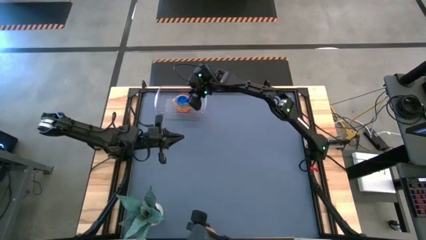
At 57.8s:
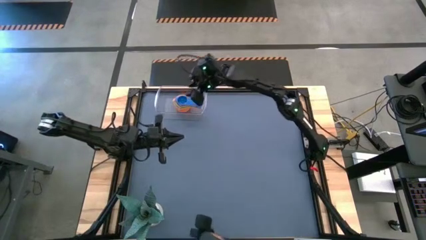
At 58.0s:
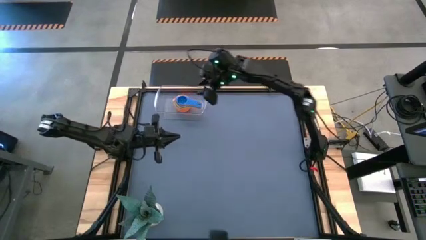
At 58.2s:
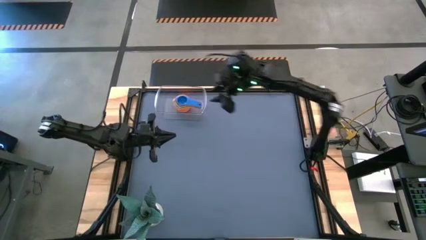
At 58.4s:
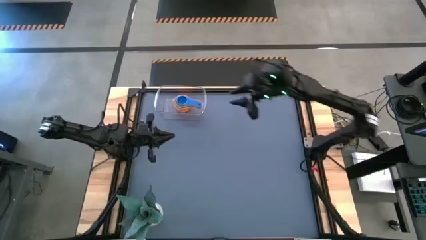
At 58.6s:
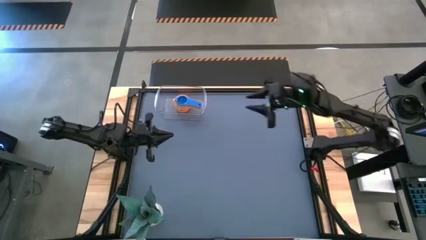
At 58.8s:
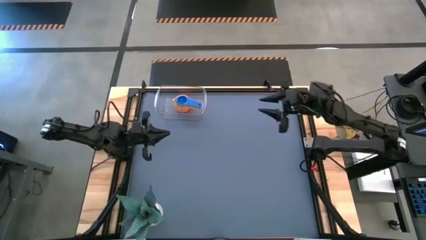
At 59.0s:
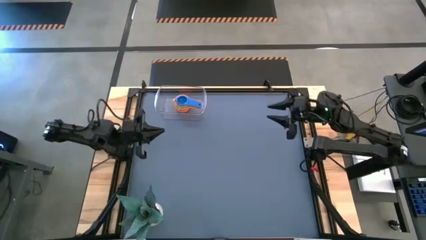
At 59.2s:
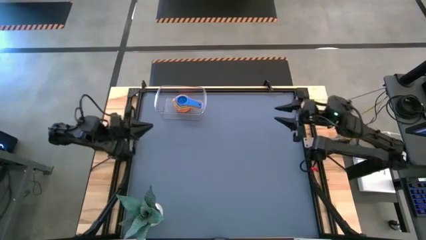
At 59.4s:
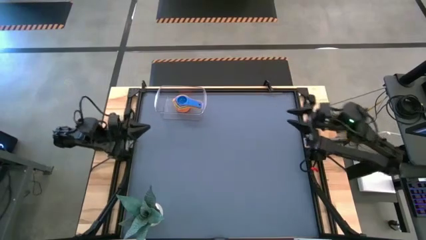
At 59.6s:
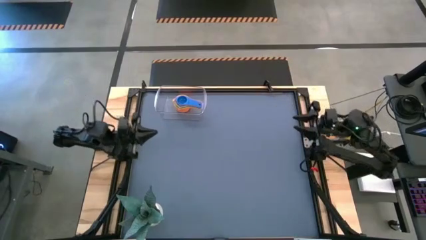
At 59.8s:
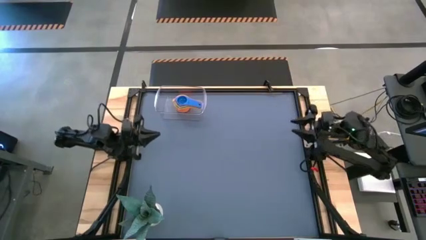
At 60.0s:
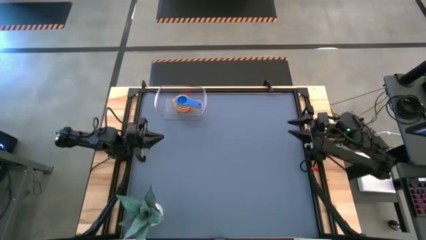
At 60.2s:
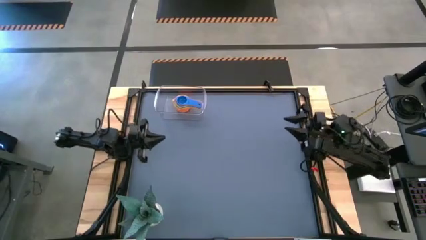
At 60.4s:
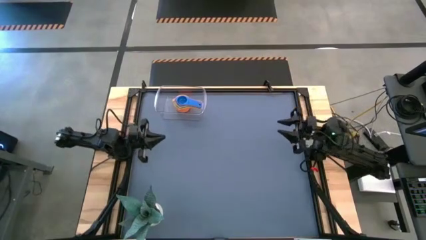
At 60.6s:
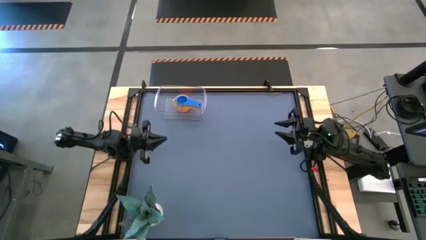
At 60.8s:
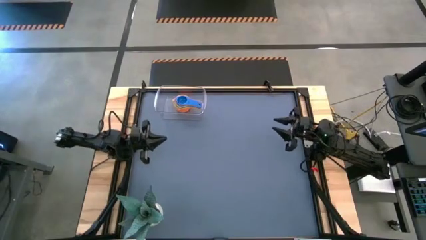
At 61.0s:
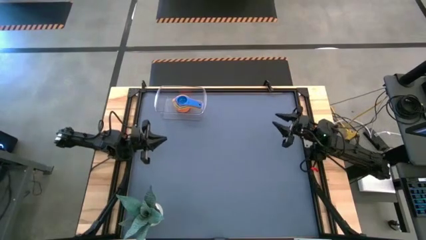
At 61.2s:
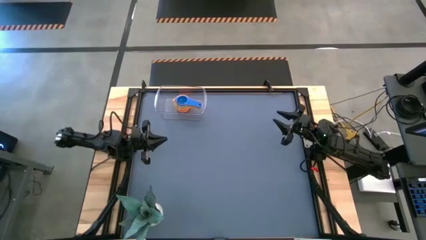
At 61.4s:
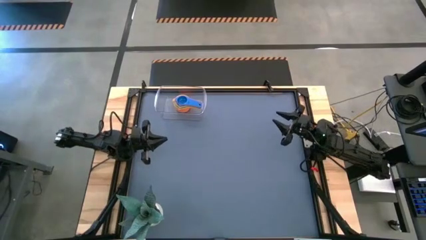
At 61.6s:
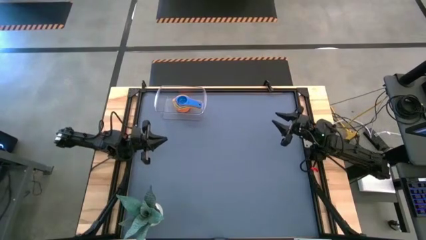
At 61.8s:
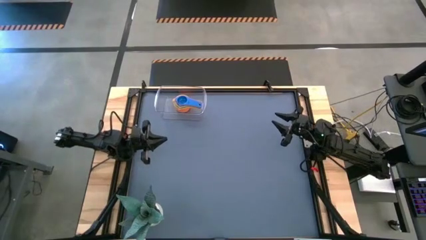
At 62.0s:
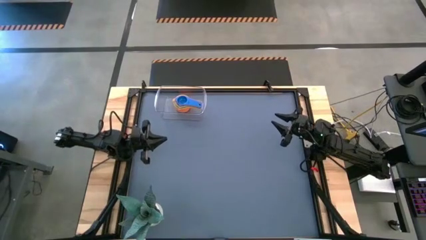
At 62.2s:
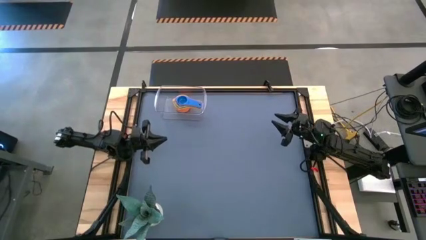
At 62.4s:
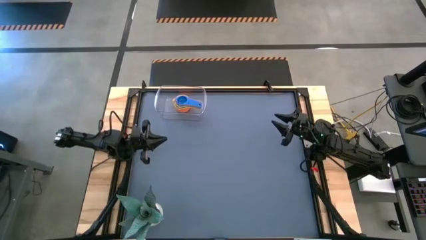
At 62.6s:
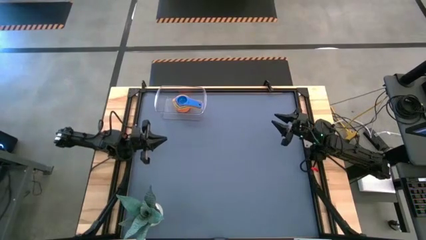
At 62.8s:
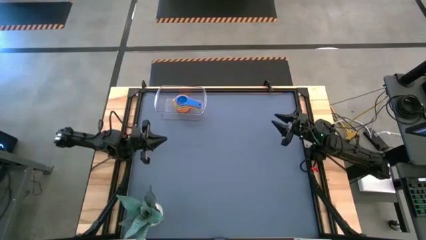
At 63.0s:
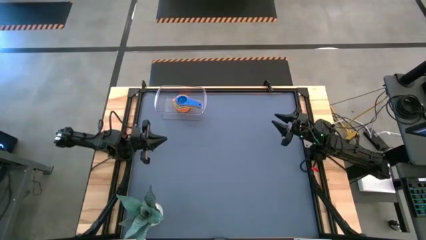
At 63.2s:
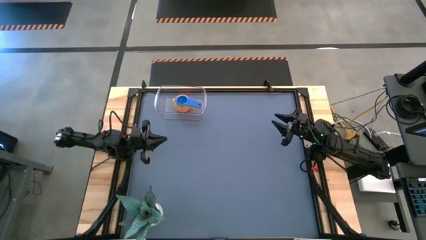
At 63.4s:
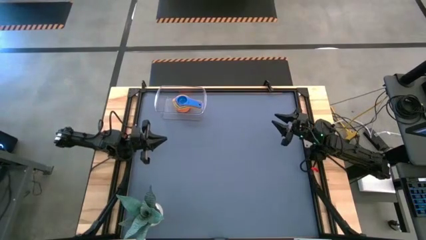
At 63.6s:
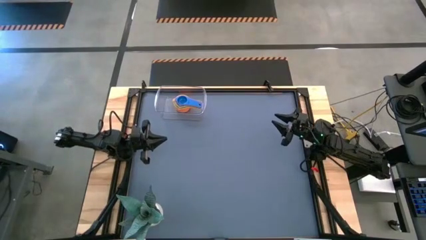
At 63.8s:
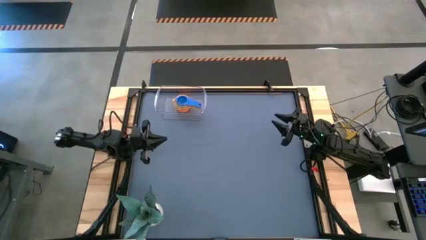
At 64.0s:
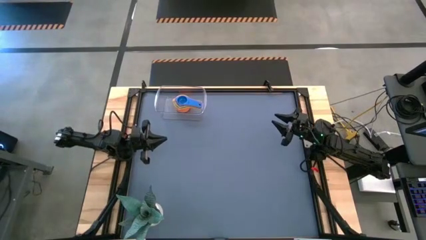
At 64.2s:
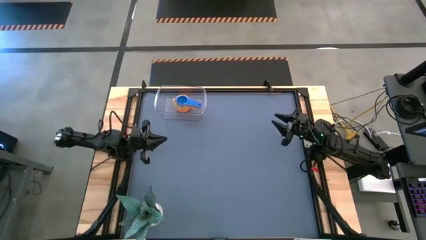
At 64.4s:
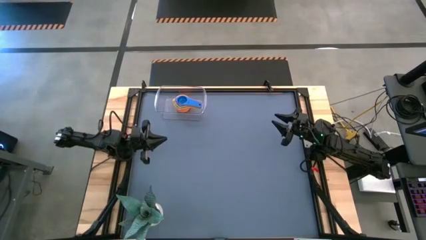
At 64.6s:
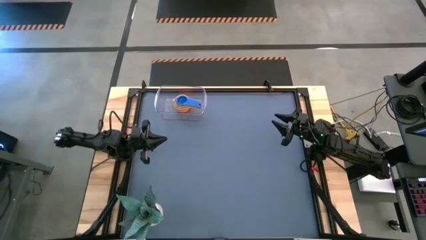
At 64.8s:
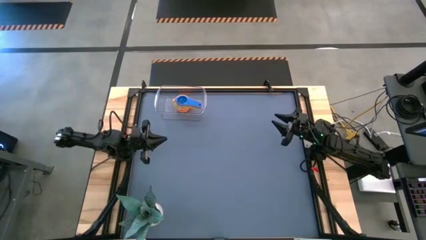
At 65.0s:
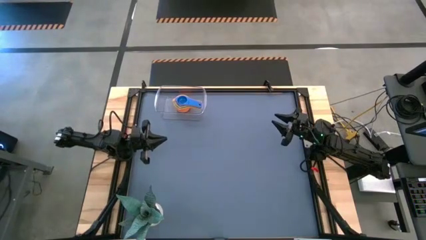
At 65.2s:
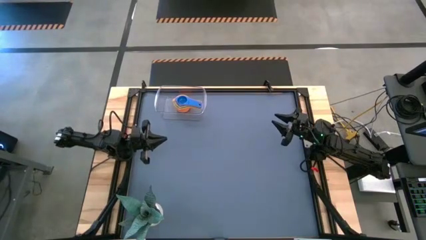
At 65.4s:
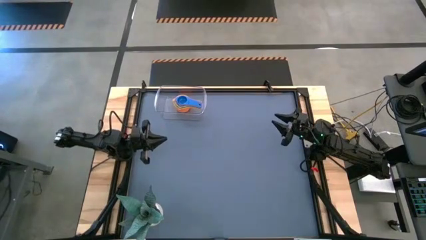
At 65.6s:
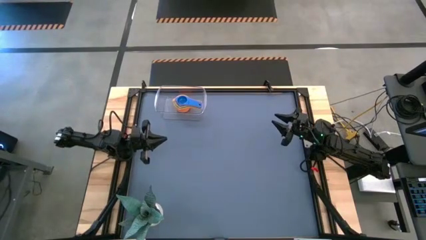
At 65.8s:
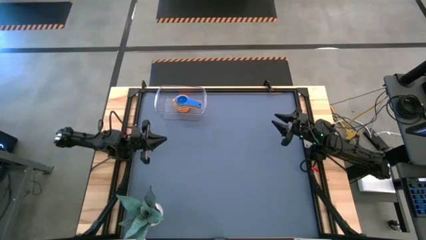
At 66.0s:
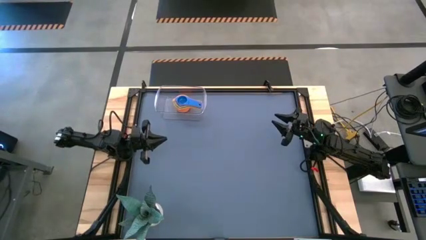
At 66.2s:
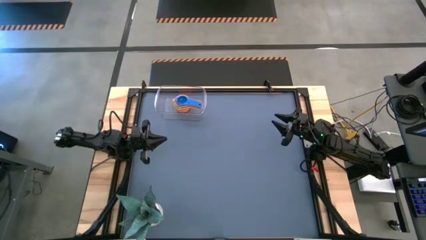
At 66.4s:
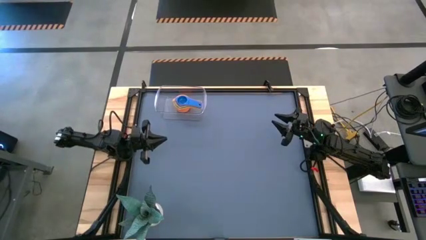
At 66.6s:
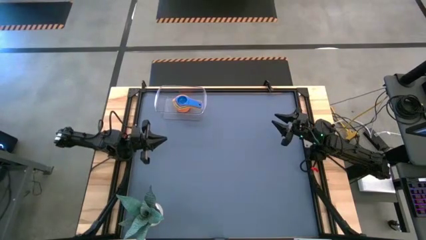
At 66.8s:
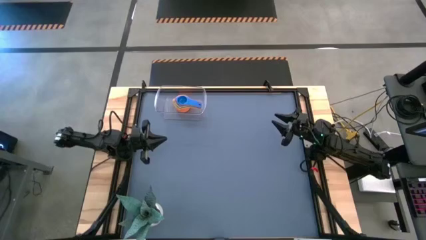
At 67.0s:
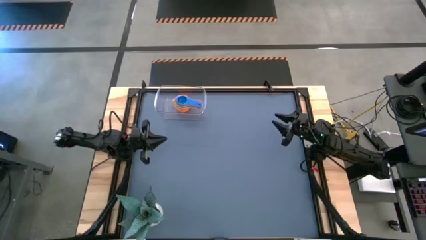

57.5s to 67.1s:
Task: Nest measuring cups in basket
Return to Home Position

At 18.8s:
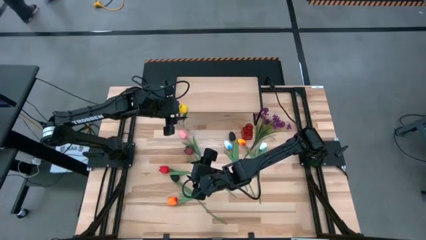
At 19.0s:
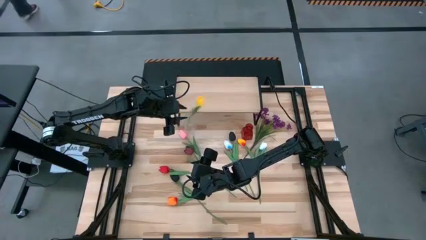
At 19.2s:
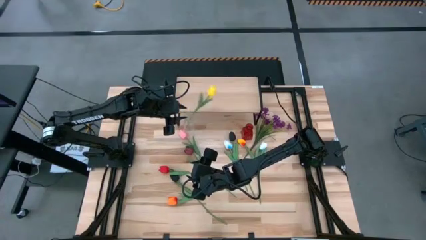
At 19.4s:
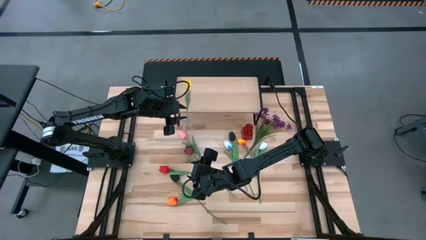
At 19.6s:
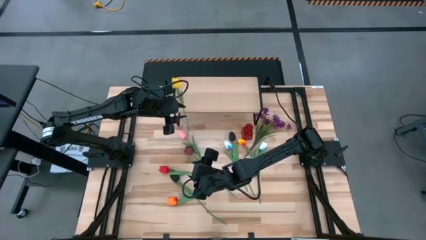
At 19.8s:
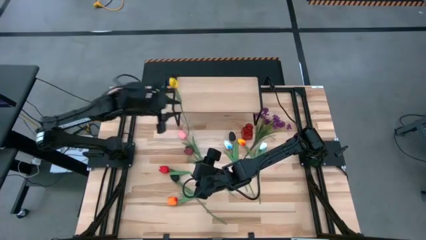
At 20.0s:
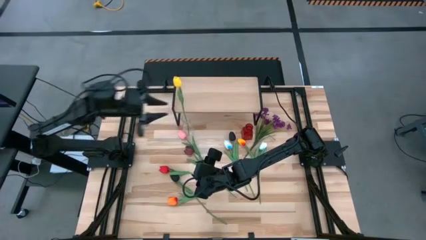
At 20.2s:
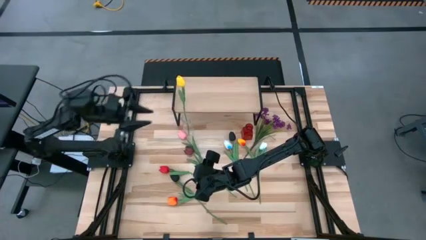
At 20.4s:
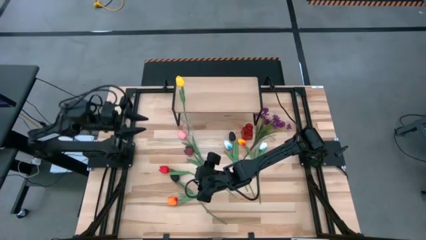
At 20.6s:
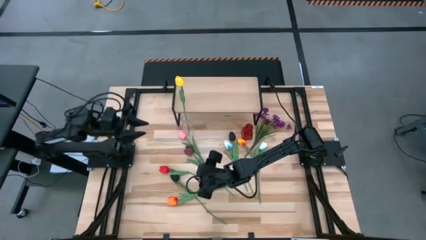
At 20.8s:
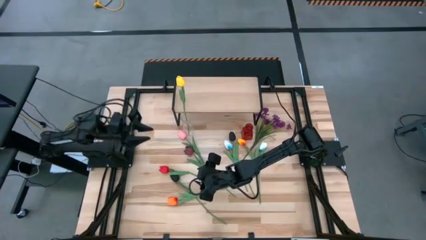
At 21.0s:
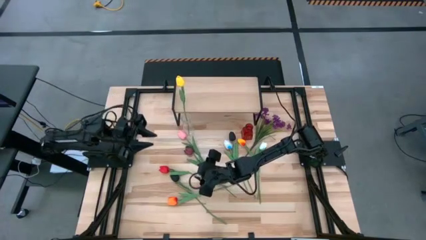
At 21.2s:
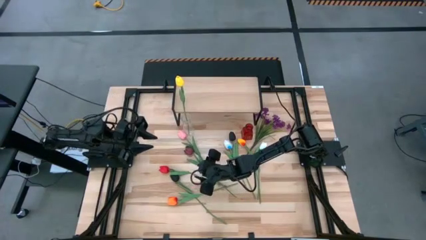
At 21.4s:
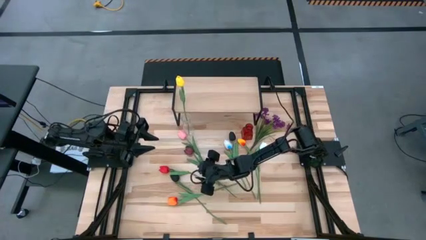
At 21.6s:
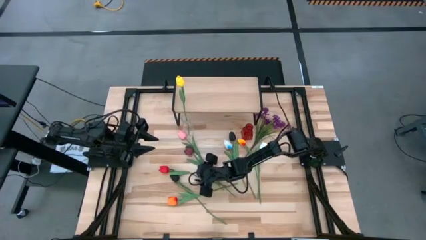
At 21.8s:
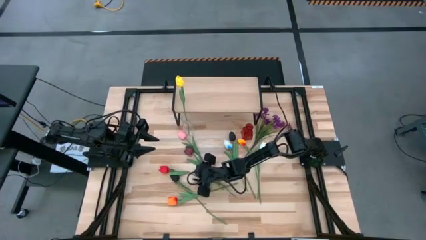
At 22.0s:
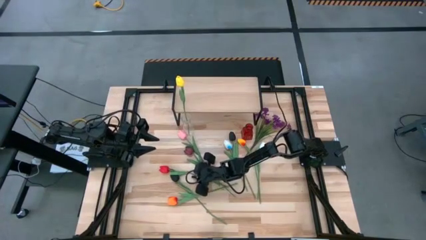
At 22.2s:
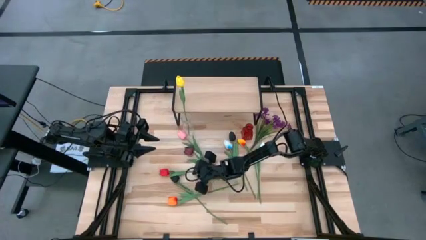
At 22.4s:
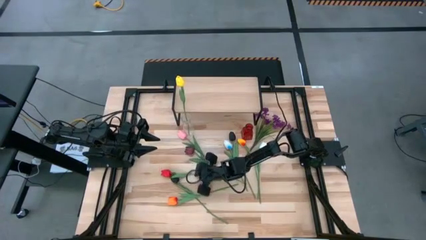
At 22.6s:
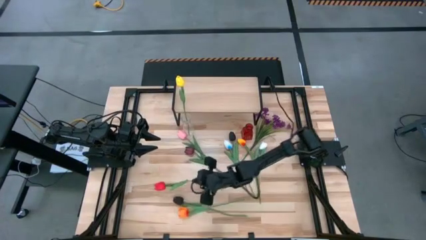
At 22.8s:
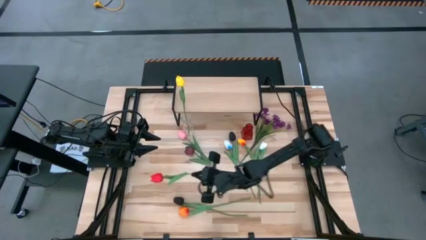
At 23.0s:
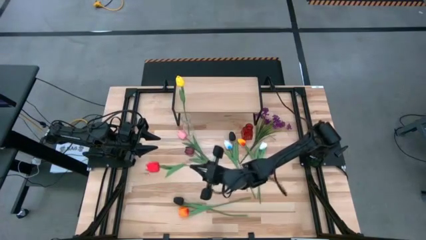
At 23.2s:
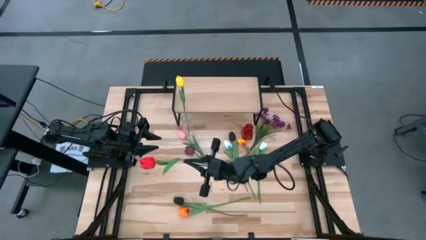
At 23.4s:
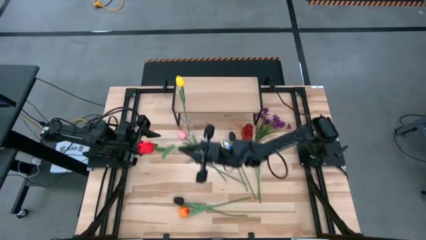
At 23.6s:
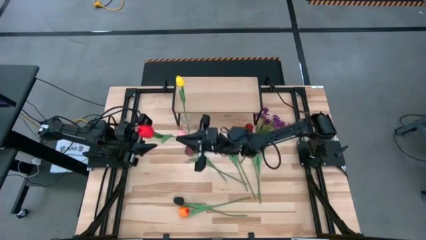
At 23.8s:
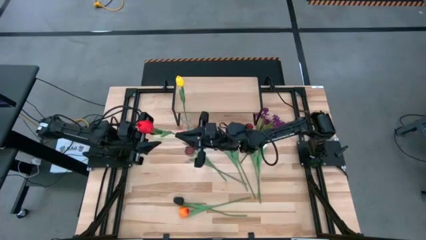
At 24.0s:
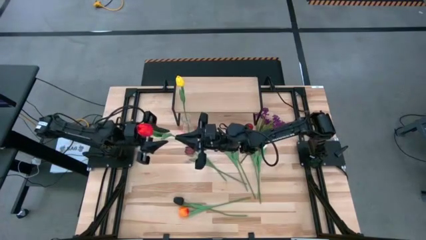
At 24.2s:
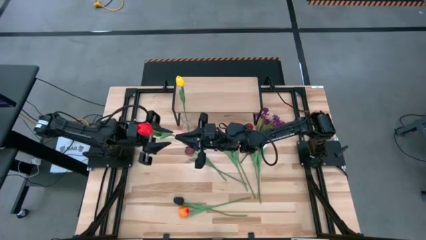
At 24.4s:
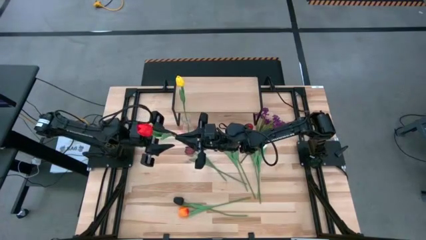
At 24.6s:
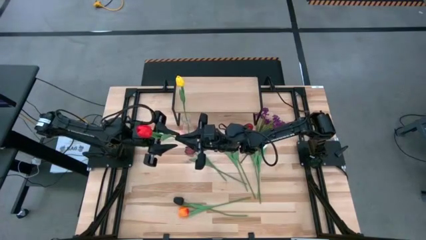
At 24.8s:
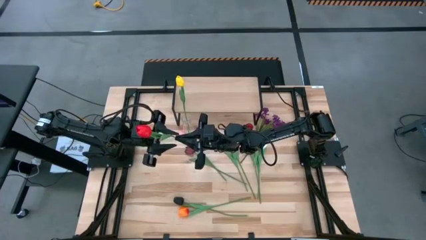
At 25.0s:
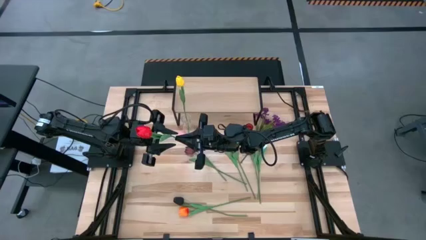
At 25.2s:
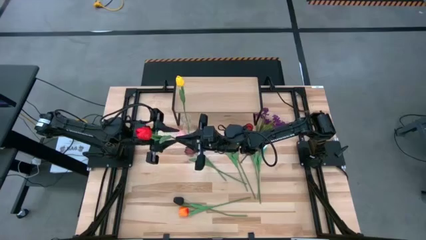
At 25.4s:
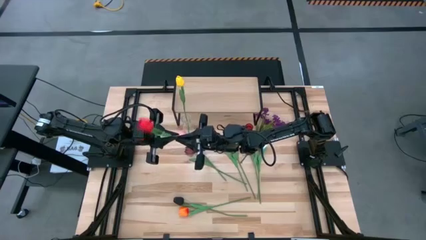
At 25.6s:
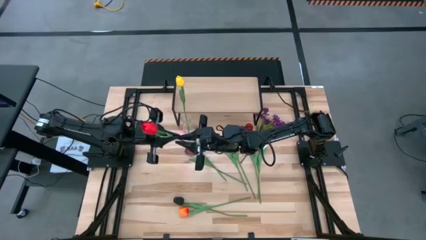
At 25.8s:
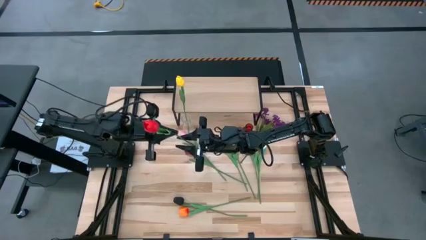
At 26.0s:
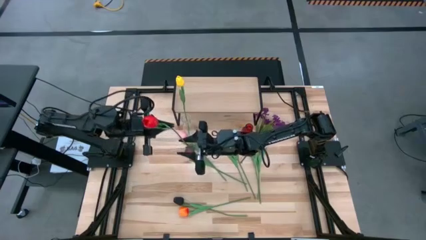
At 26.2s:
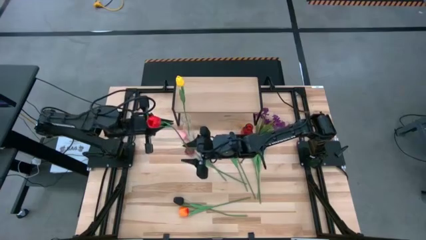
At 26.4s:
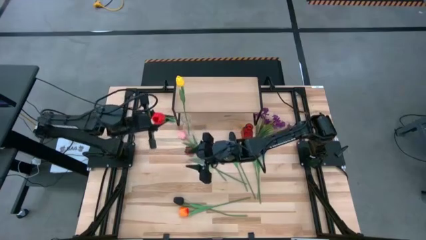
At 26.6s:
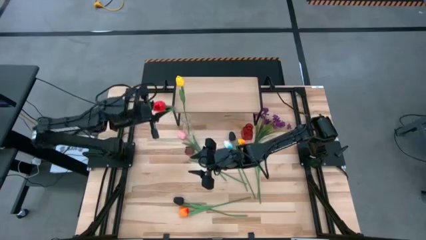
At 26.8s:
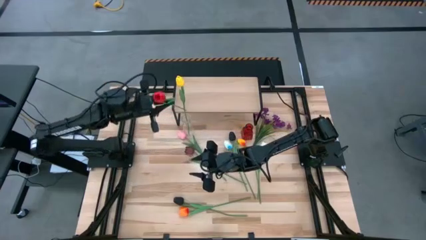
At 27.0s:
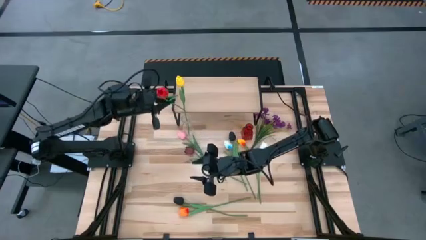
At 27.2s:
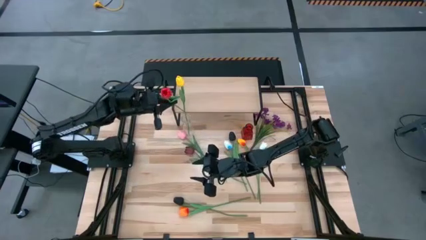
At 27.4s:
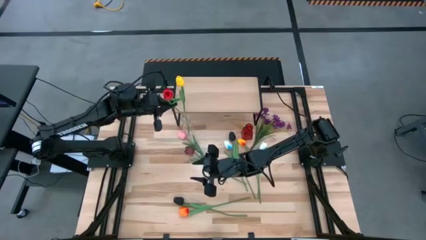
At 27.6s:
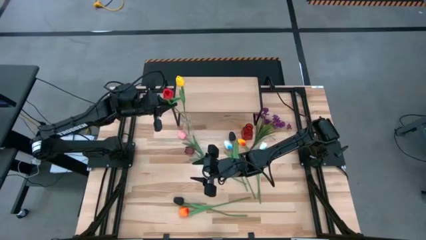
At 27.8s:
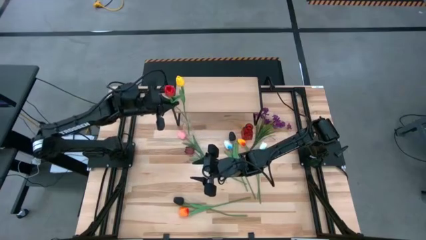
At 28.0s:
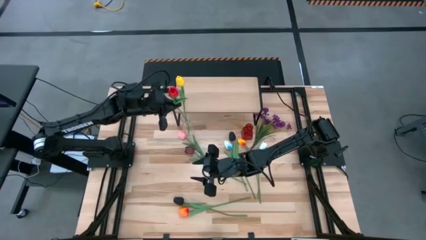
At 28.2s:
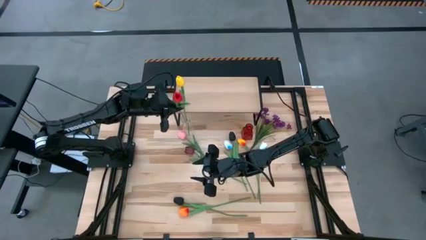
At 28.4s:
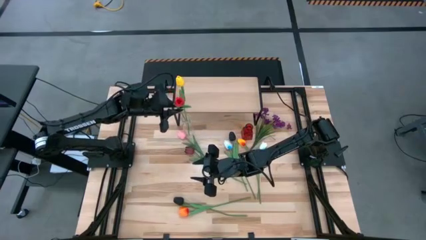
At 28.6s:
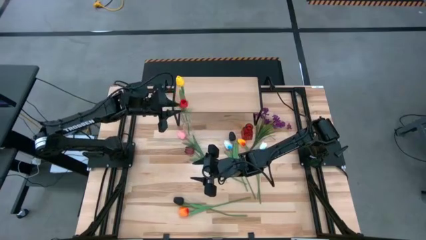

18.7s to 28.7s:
Task: Pick and place flowers into a vace then onto a shelf
Put the red flower into the transparent vase
